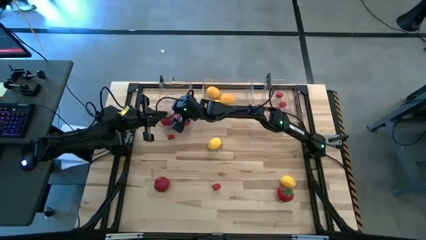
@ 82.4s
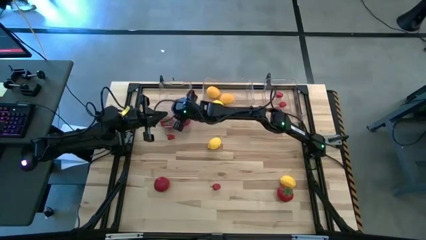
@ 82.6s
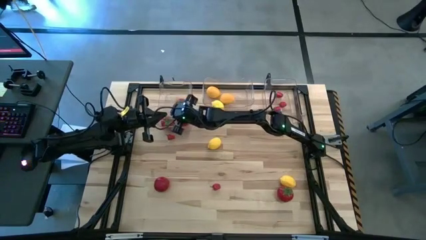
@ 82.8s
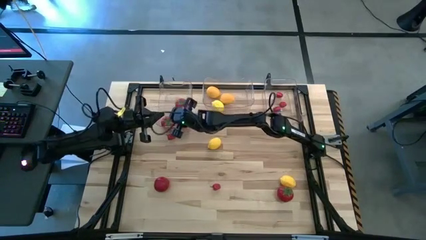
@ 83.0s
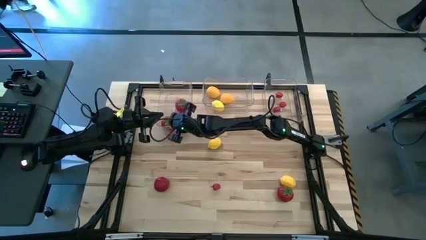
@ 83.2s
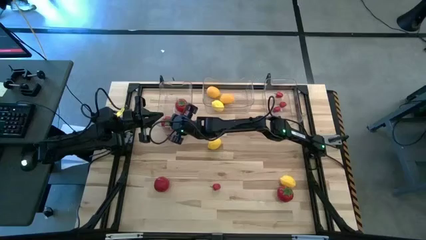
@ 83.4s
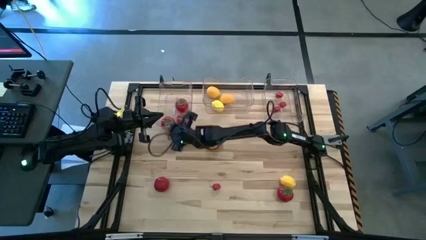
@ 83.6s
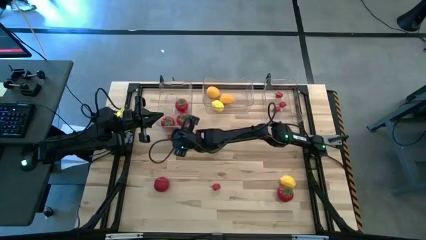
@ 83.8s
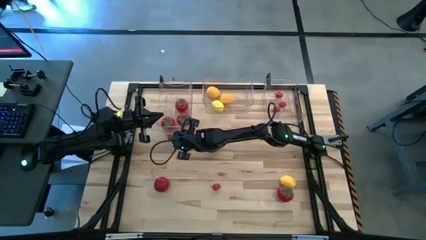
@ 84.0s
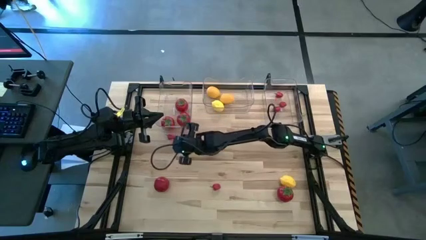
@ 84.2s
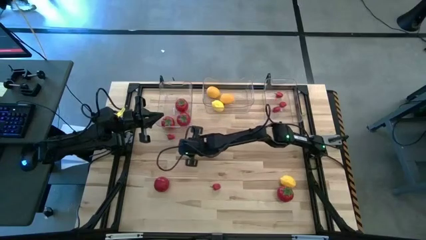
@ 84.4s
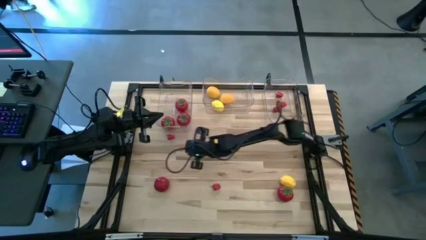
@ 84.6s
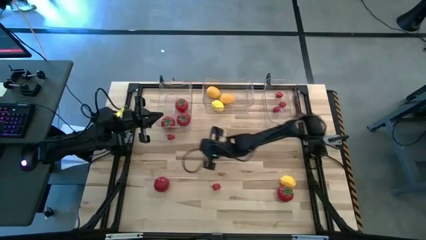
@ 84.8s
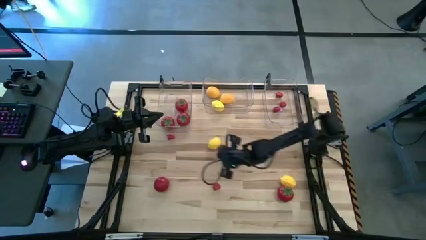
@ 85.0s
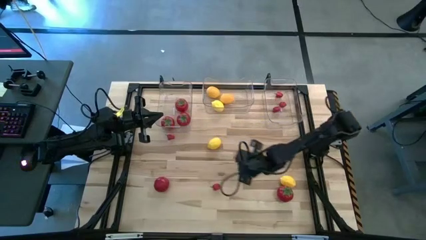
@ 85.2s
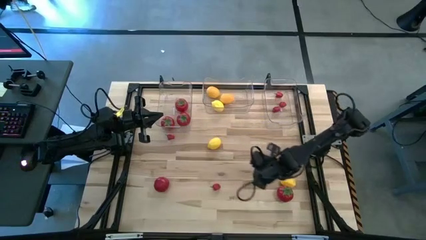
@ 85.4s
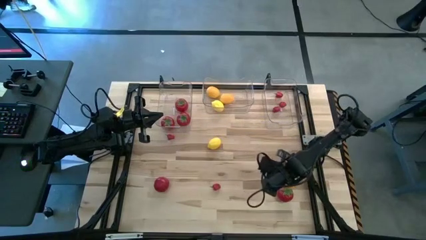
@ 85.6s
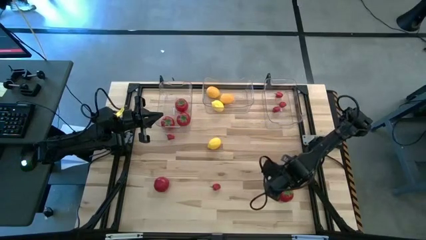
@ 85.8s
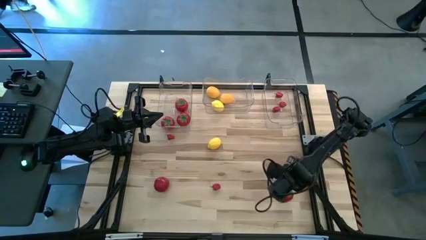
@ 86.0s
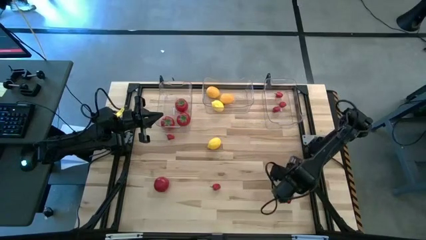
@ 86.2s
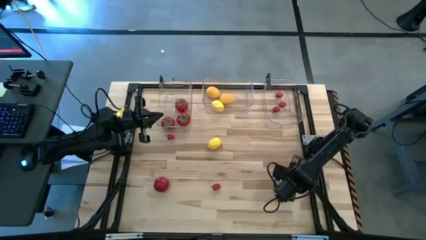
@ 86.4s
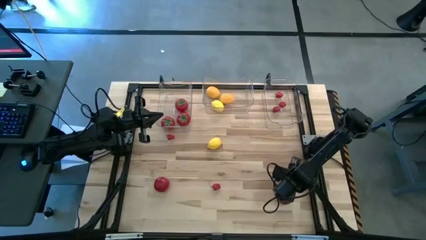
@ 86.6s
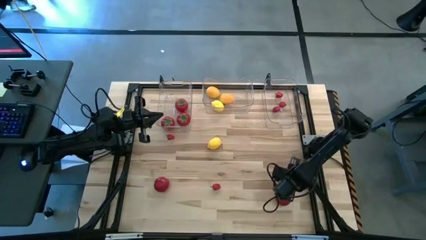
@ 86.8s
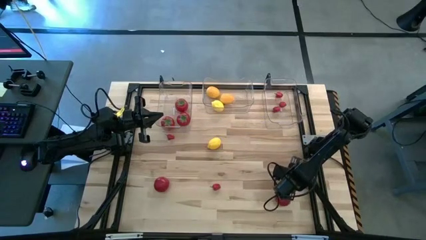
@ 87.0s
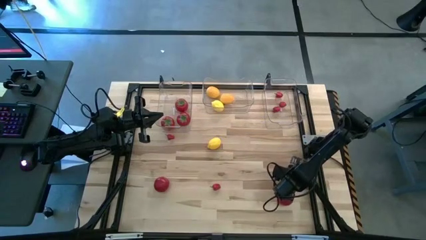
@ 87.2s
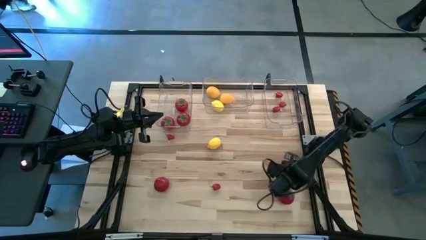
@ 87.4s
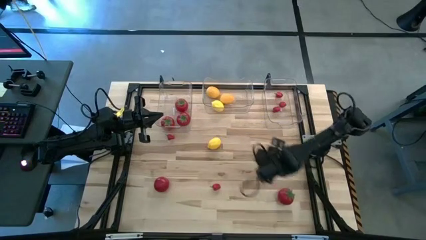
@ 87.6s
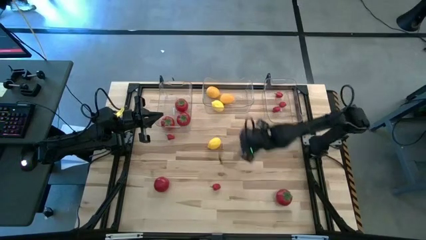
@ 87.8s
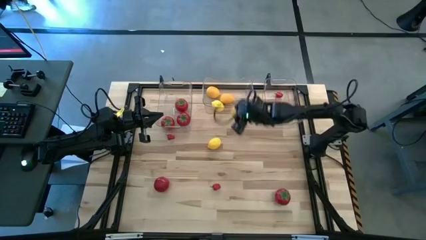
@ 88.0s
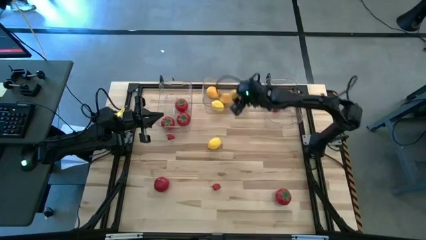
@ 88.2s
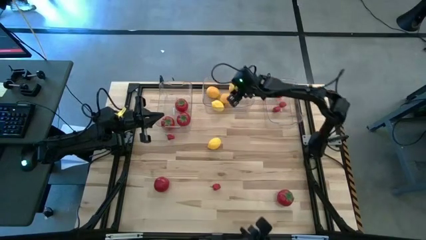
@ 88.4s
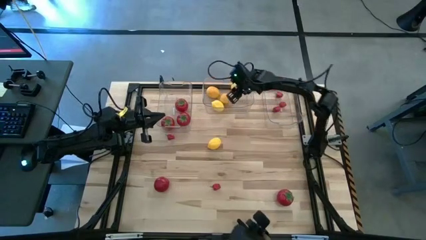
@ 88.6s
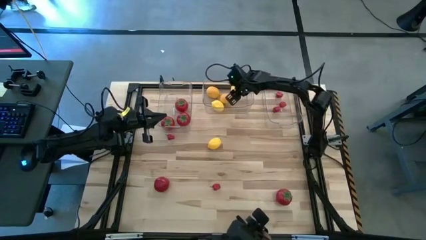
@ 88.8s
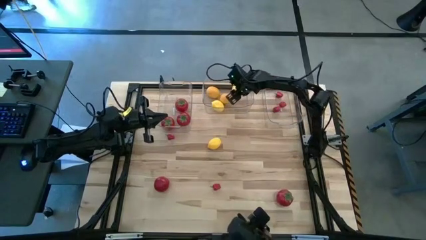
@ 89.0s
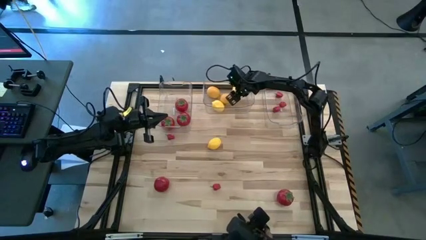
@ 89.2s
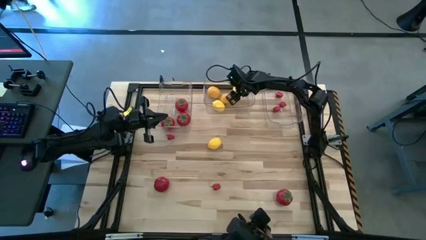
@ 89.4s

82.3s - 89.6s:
Task: Sort produce into baskets
Put the yellow lemon into the center transparent bin

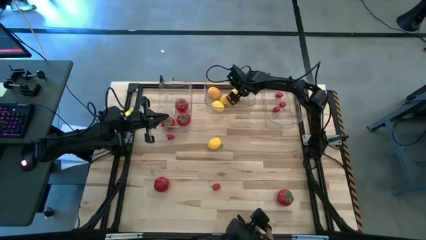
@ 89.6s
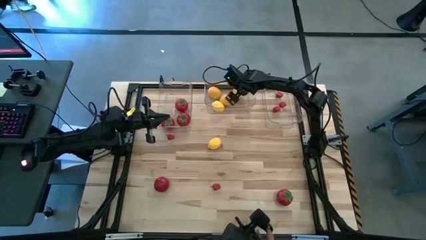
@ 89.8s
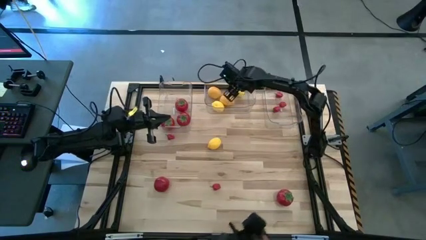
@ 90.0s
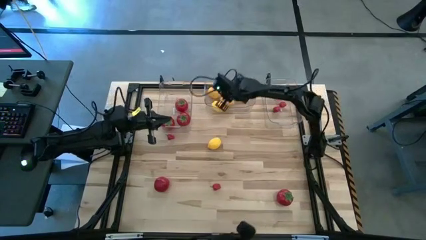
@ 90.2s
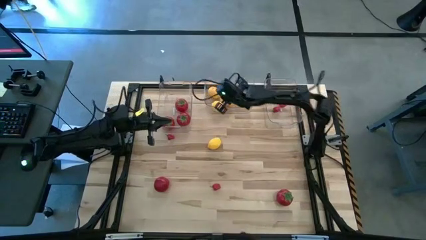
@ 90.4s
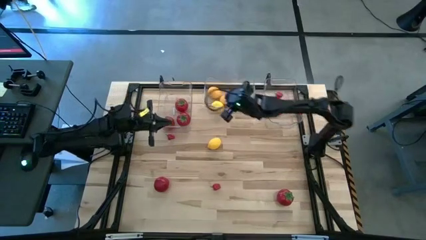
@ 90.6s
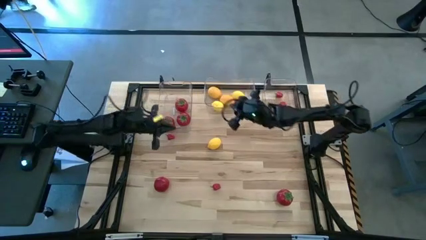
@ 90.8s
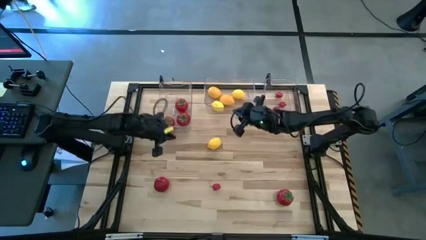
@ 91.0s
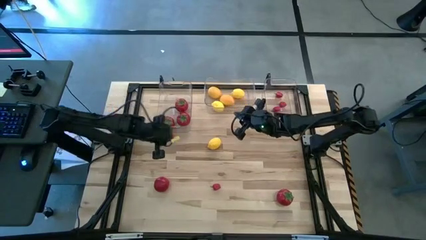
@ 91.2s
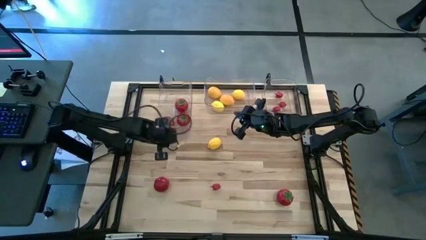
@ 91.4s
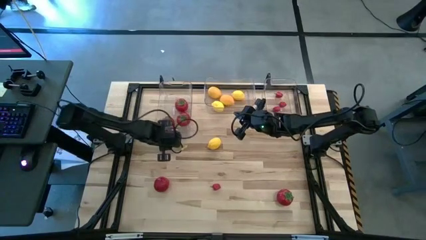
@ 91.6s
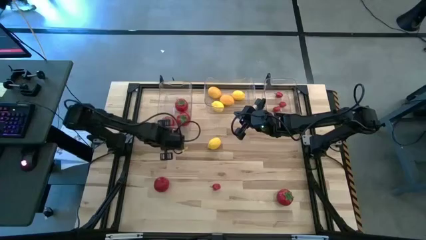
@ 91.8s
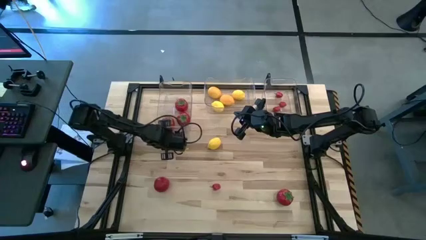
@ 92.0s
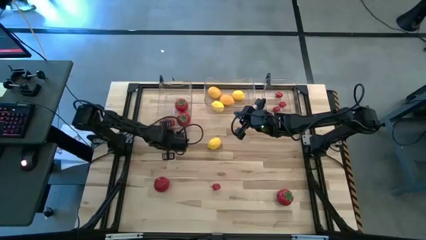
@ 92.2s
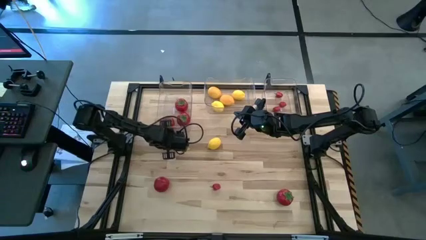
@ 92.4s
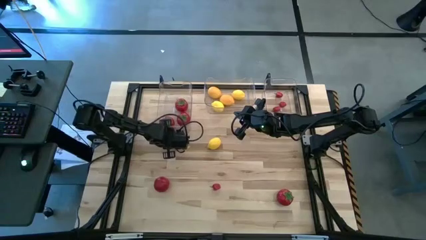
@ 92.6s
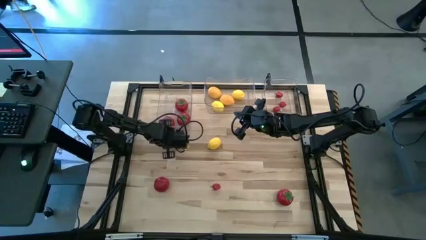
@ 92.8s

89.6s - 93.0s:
Put the red chili into the right transparent bin

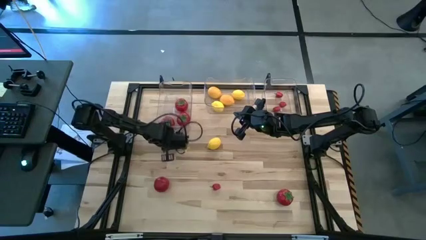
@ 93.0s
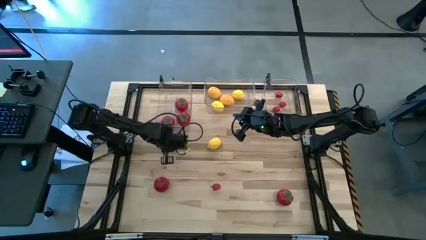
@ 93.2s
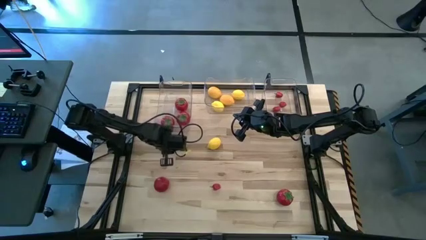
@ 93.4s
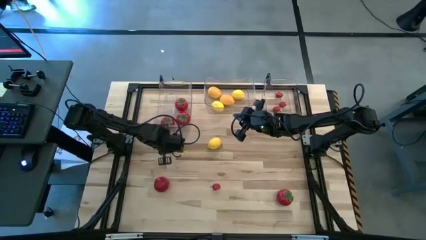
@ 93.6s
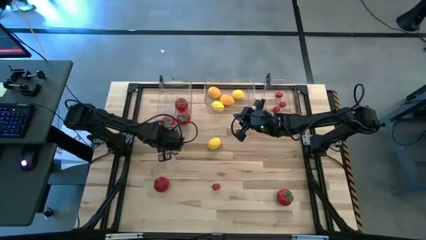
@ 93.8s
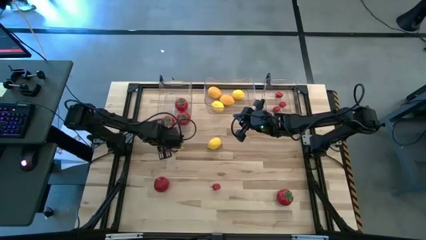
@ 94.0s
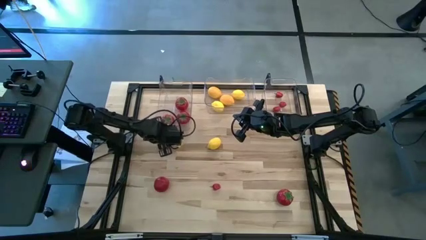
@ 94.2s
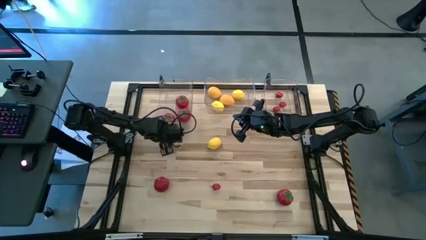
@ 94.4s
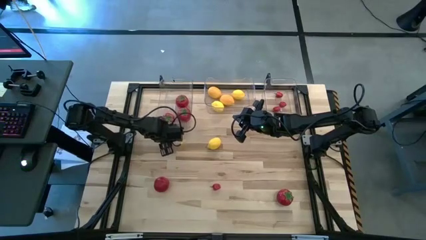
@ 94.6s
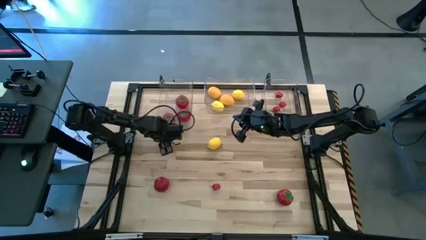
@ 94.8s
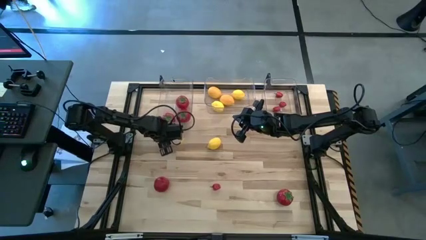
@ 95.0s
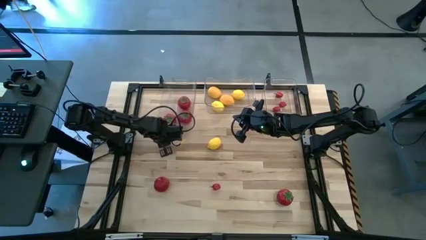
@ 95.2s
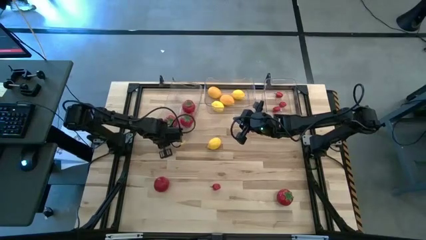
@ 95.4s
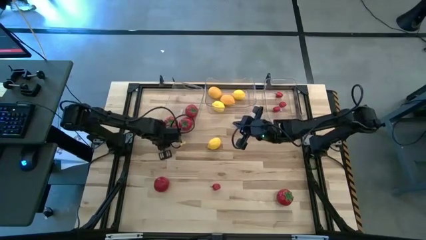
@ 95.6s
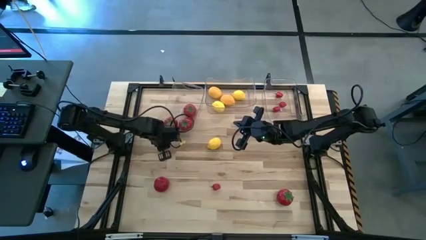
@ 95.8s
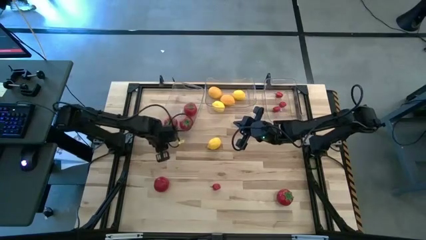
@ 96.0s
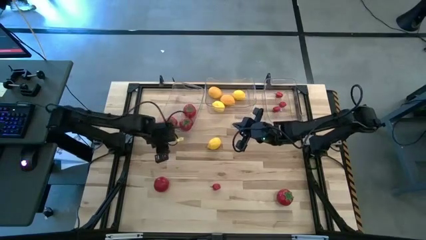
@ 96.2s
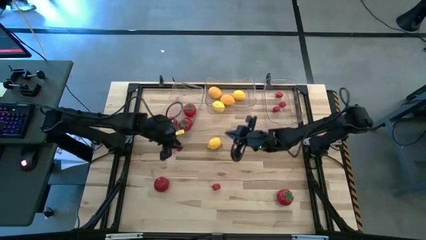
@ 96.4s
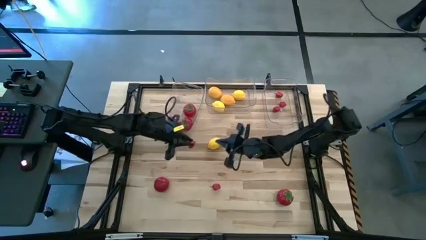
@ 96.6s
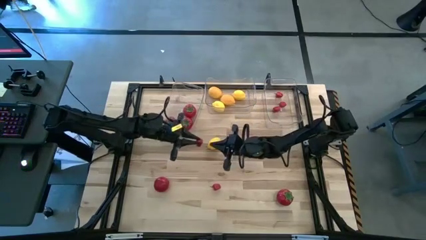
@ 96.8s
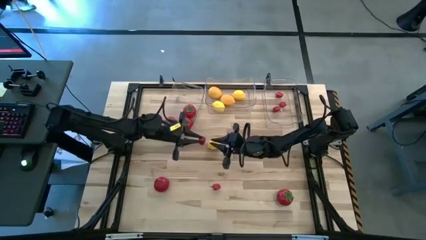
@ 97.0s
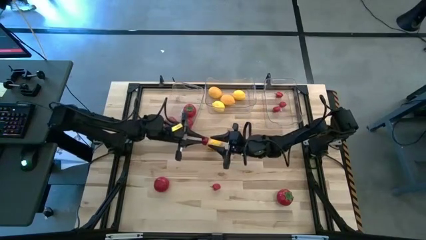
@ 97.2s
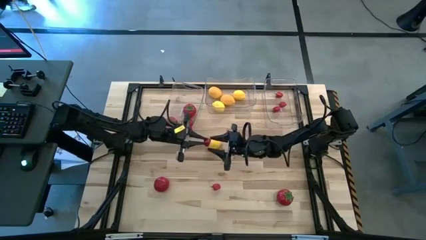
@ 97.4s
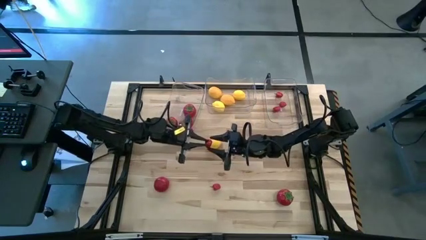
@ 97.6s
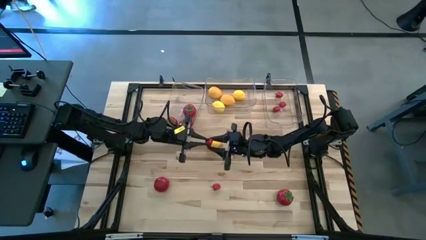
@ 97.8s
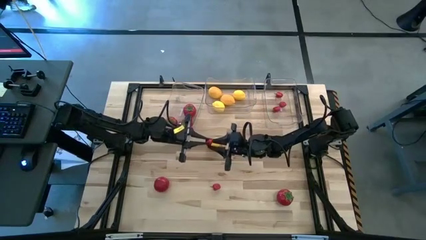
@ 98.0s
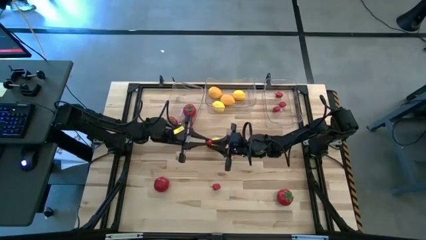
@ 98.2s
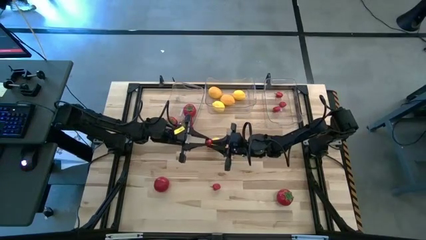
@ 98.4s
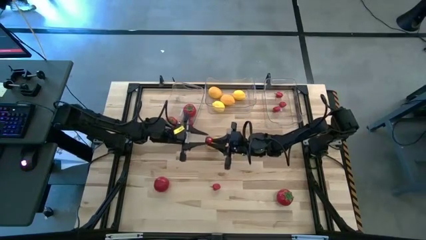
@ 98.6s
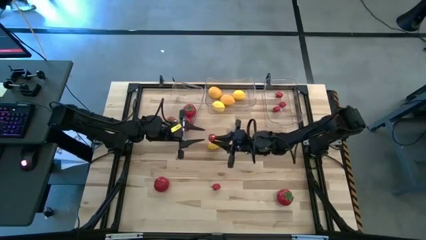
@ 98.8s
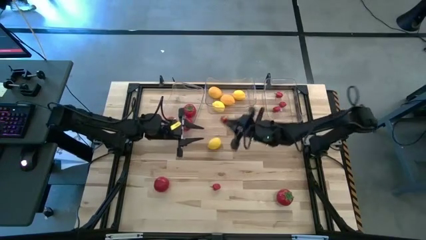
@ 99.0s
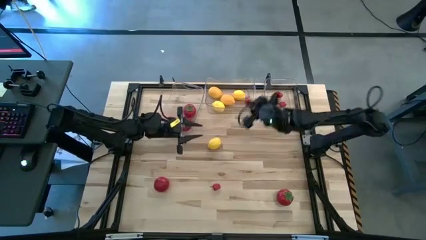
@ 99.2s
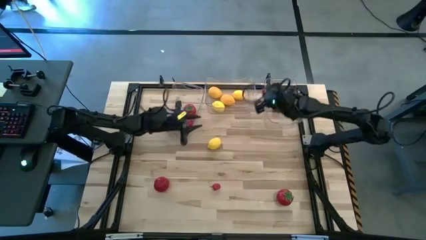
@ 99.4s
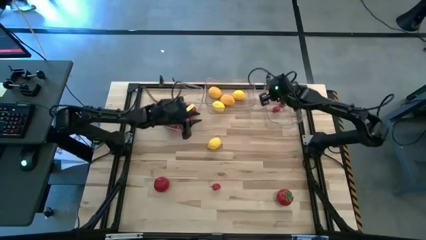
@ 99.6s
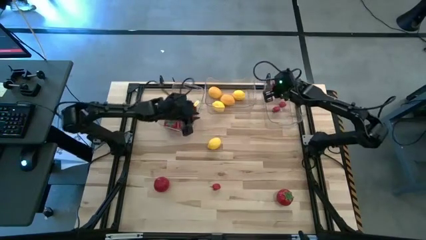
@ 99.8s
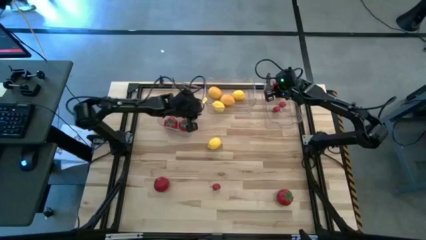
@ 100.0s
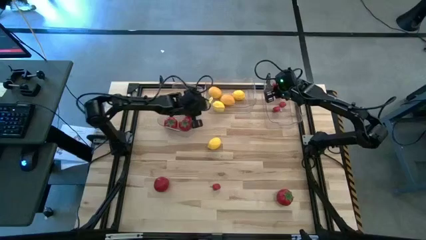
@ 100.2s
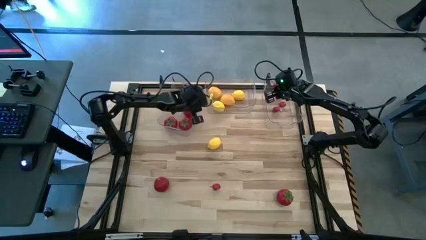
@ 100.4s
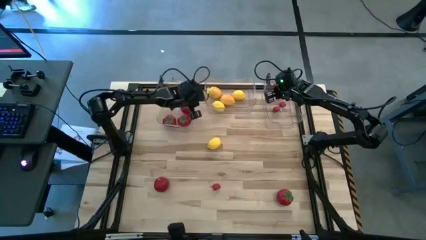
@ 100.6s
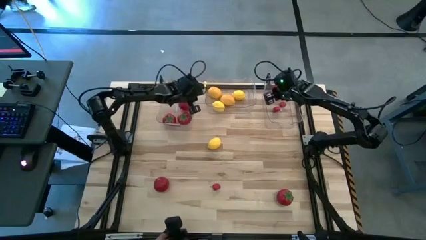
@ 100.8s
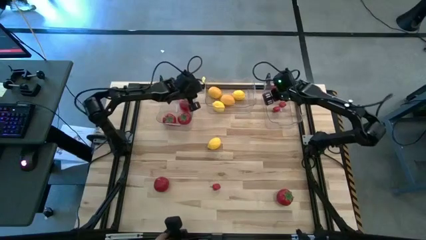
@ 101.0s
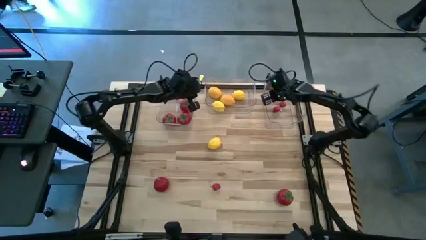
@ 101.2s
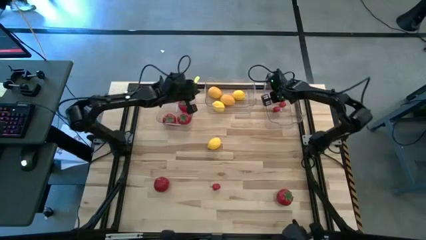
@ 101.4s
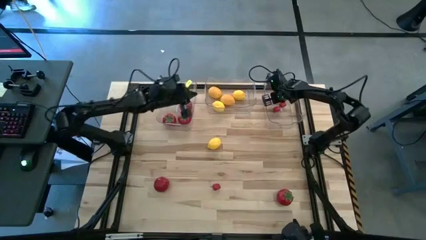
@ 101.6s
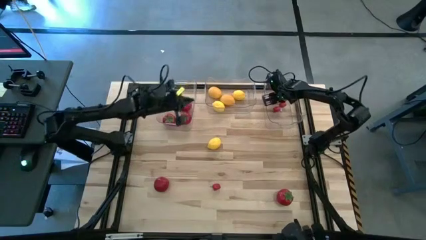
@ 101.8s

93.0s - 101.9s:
Put the red chili into the right transparent bin
